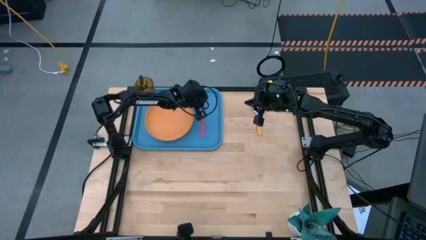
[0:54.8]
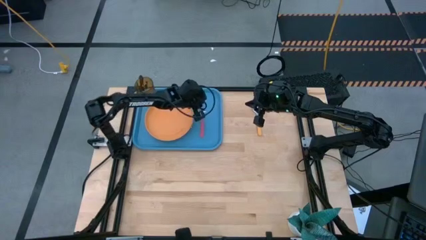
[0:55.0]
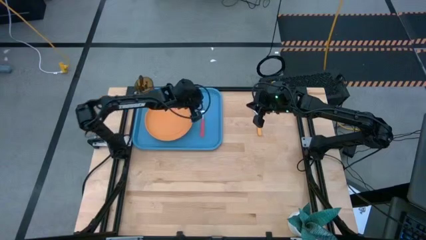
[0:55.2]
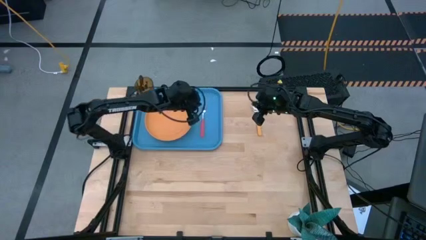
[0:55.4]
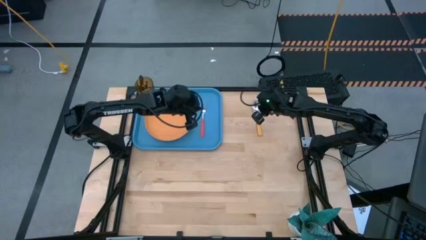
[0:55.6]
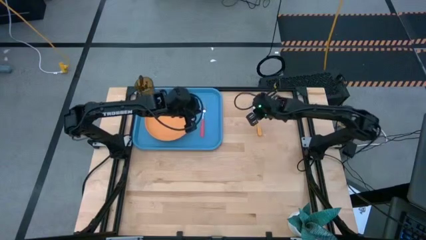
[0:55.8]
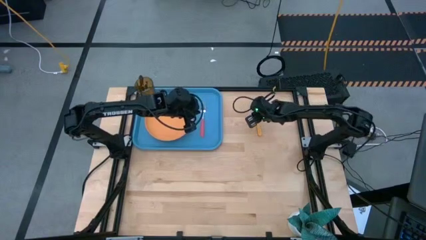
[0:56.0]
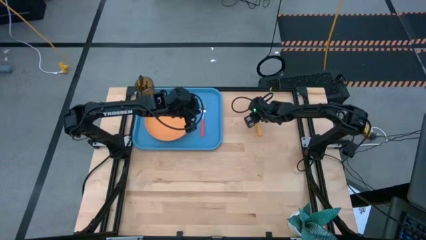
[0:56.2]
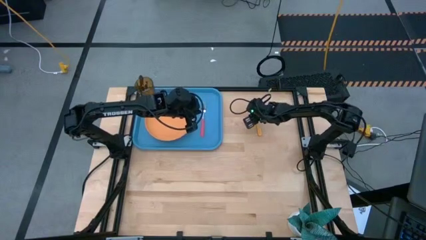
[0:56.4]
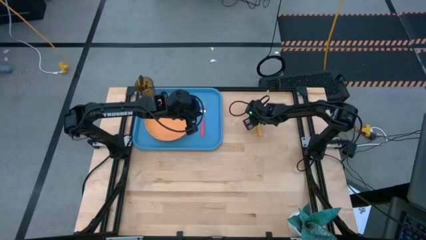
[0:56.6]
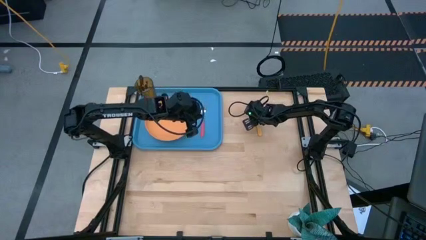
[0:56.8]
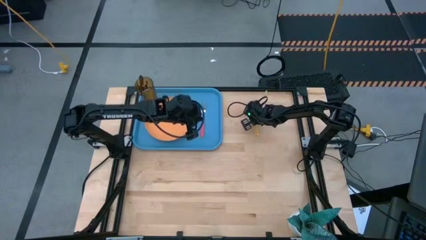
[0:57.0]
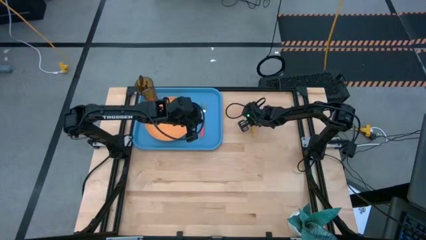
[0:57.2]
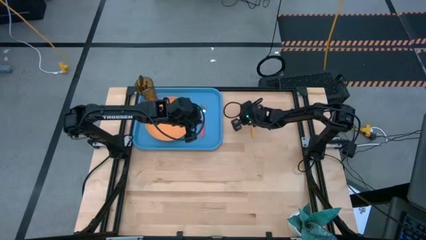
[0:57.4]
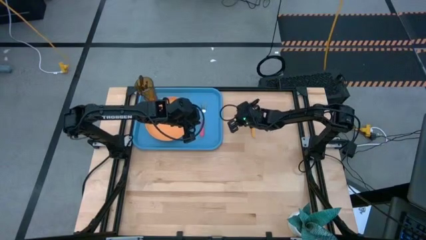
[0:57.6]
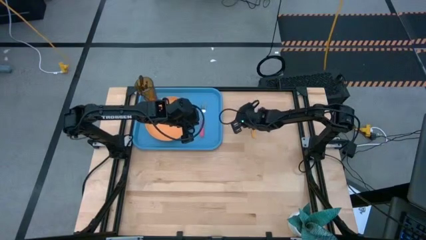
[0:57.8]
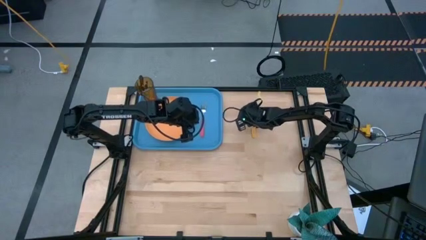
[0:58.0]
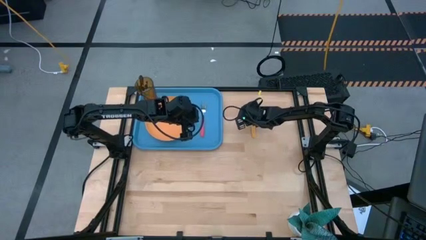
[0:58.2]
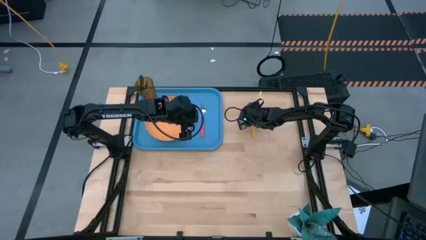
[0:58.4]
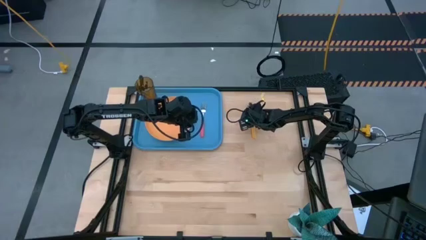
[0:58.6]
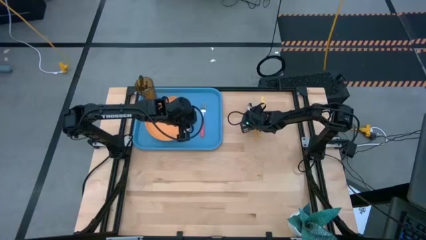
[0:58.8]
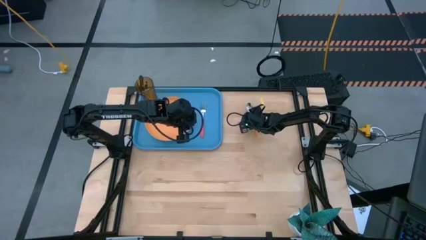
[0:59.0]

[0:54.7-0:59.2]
Task: Pick and place plate/cup/fork/spoon on tray
Put the yellow spoon on the blue tray

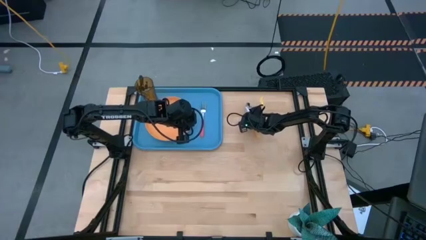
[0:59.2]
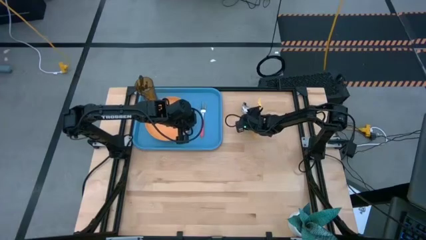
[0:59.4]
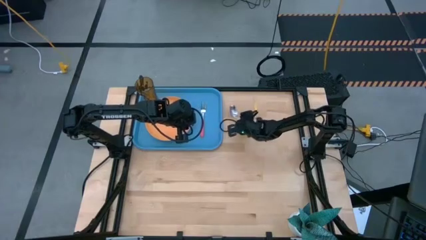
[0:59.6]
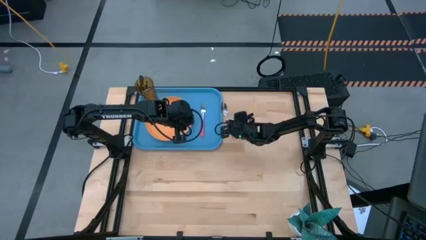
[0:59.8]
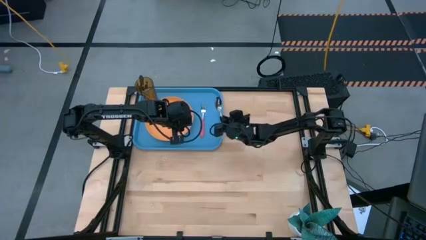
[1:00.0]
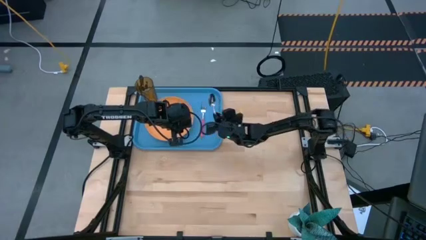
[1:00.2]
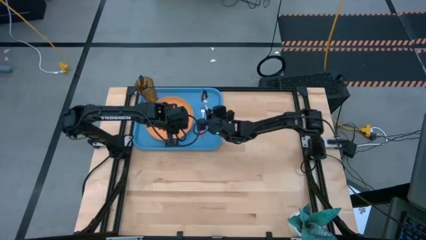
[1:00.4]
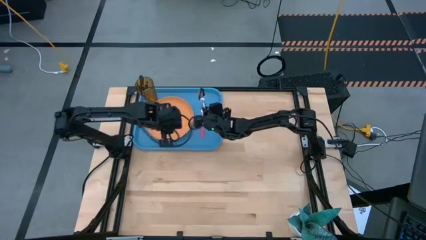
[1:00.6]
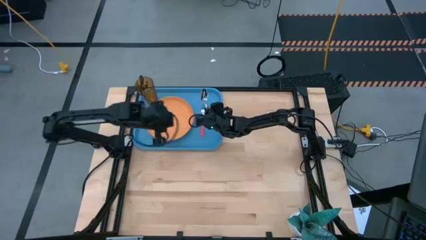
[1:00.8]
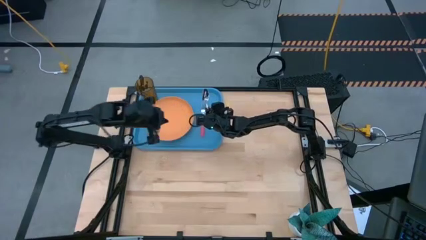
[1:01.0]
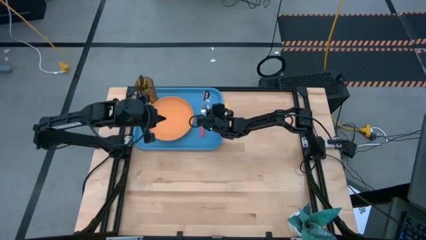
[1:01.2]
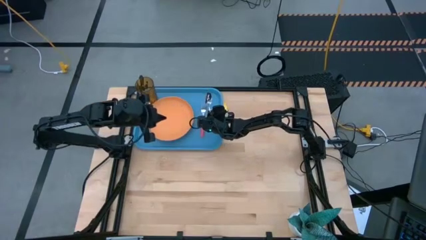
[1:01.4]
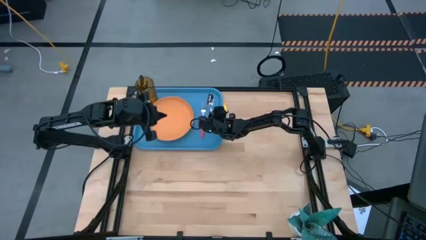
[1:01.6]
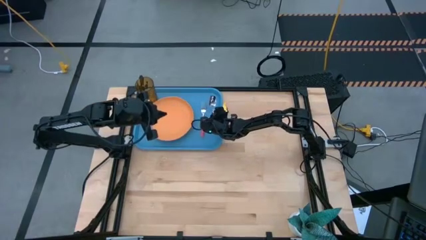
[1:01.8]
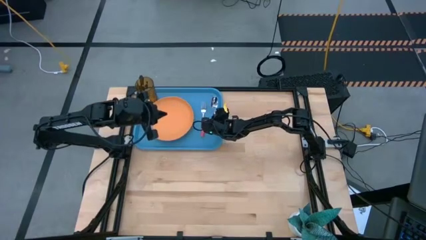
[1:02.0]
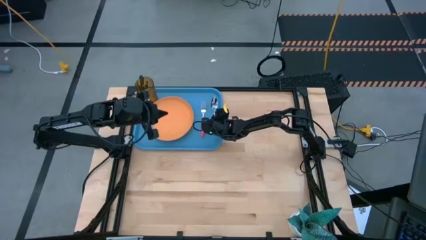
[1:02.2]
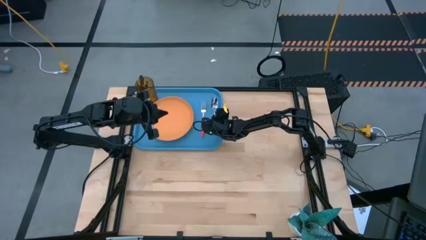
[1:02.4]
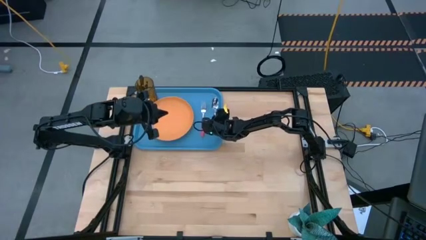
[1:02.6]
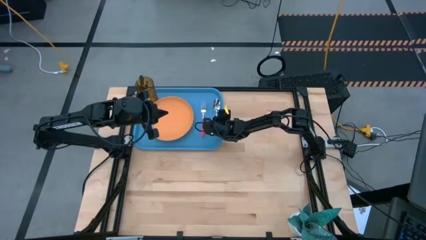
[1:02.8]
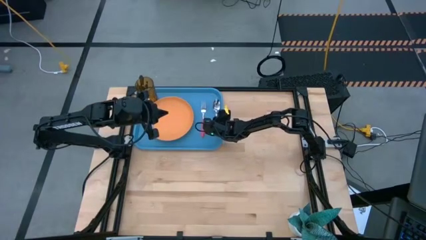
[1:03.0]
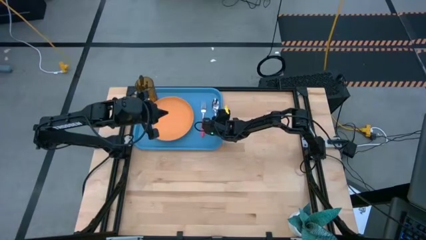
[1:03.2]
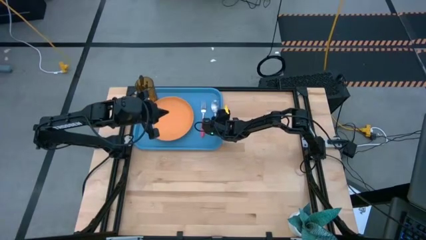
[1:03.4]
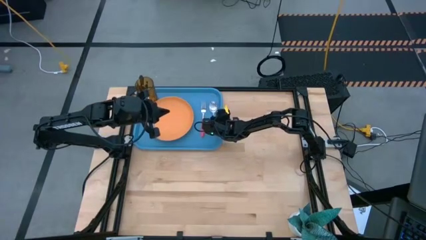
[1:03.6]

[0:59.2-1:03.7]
Put the yellow spoon on the blue tray

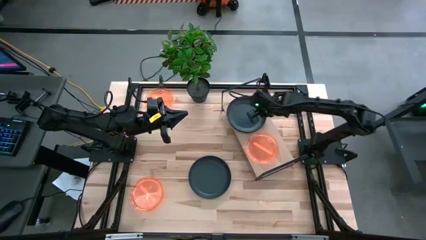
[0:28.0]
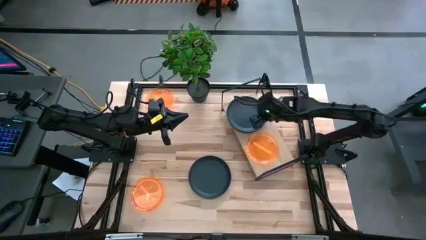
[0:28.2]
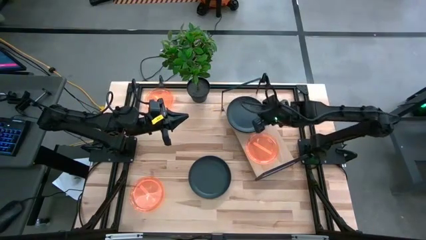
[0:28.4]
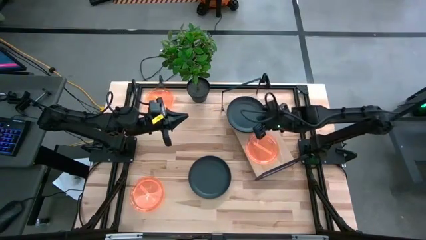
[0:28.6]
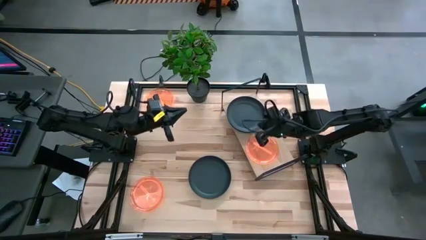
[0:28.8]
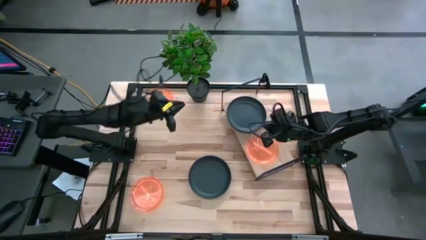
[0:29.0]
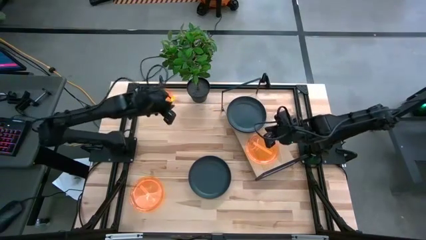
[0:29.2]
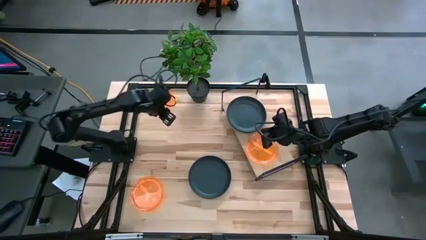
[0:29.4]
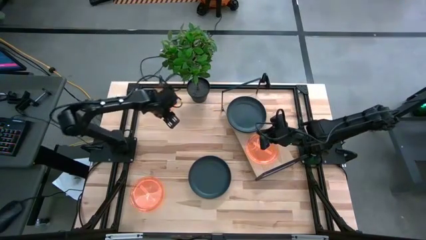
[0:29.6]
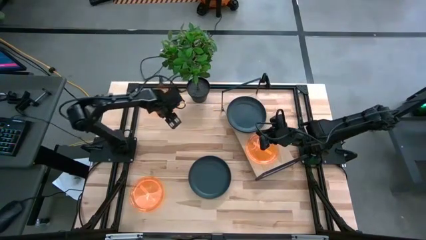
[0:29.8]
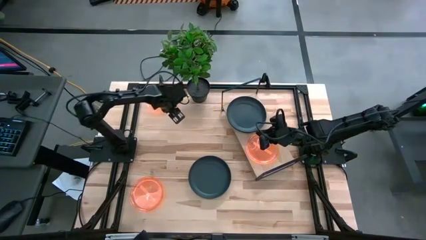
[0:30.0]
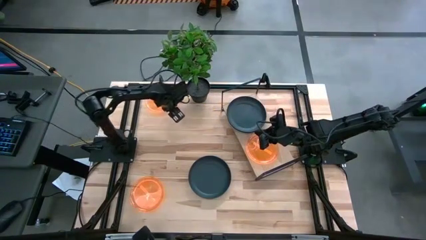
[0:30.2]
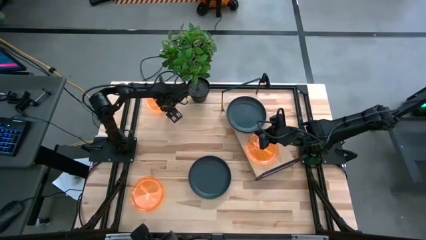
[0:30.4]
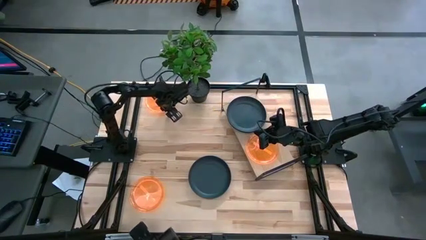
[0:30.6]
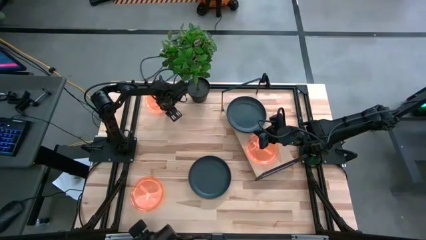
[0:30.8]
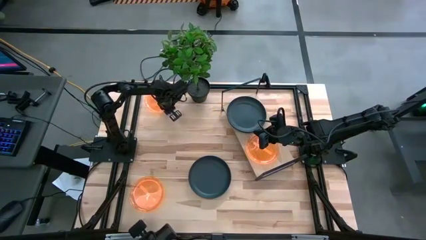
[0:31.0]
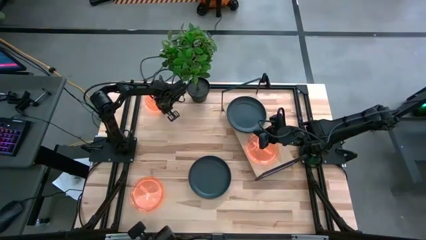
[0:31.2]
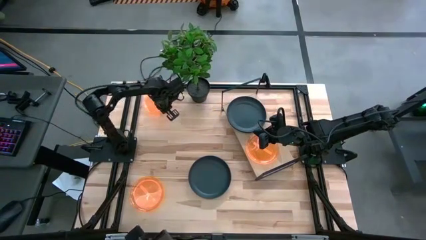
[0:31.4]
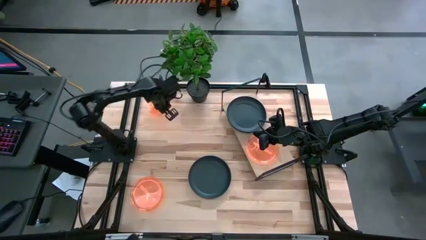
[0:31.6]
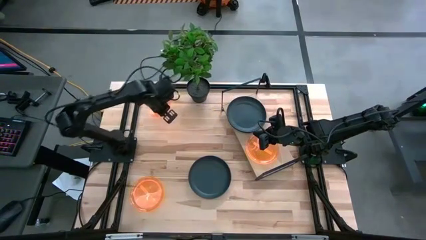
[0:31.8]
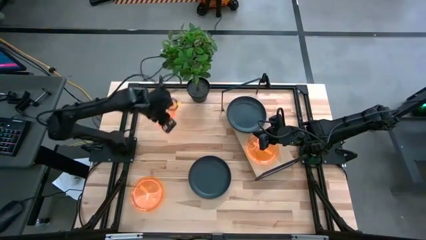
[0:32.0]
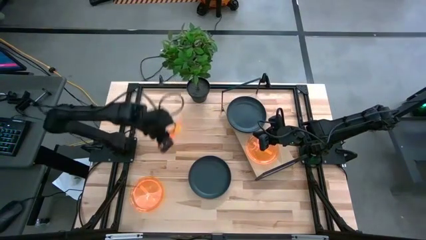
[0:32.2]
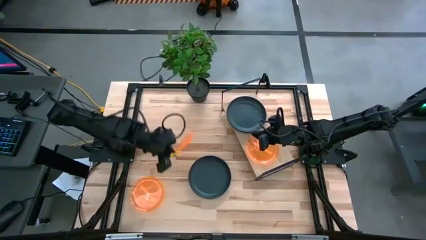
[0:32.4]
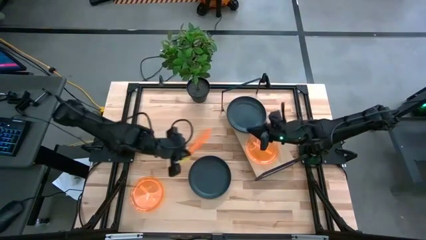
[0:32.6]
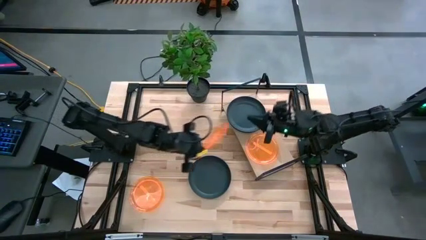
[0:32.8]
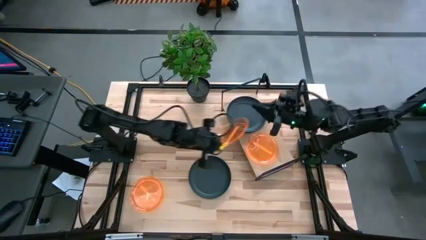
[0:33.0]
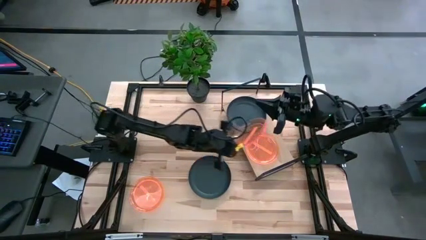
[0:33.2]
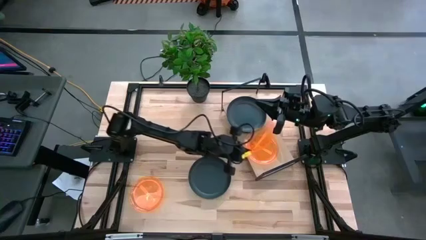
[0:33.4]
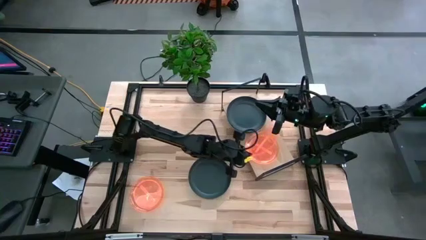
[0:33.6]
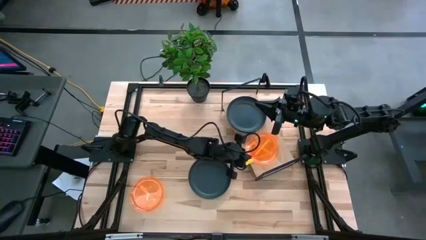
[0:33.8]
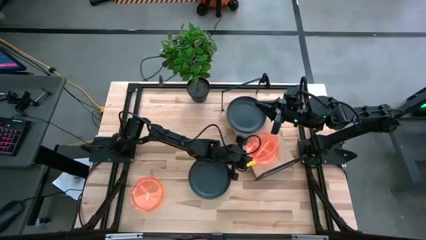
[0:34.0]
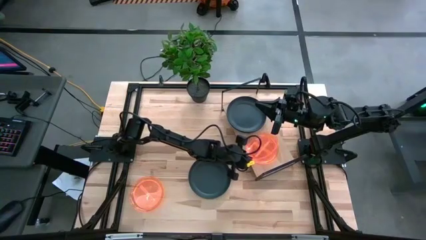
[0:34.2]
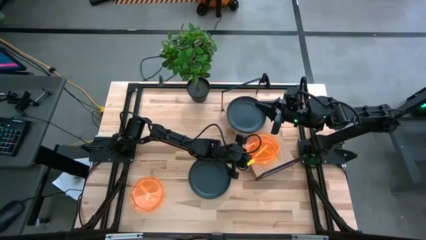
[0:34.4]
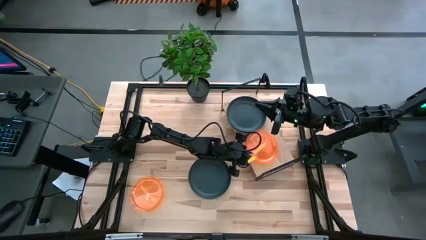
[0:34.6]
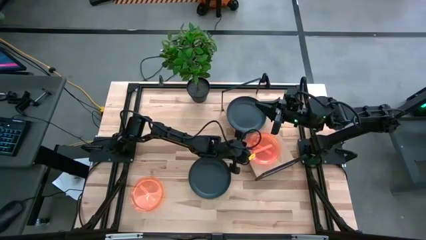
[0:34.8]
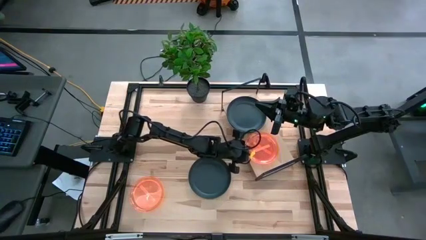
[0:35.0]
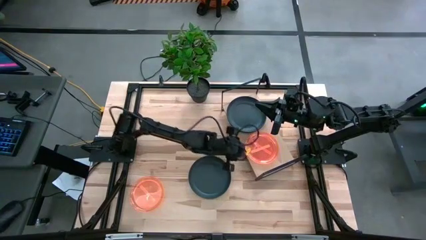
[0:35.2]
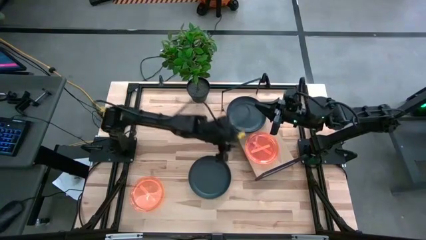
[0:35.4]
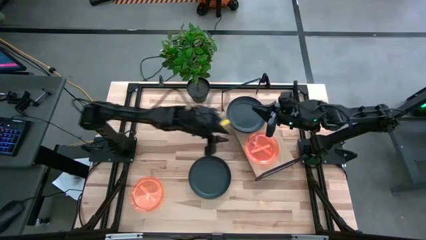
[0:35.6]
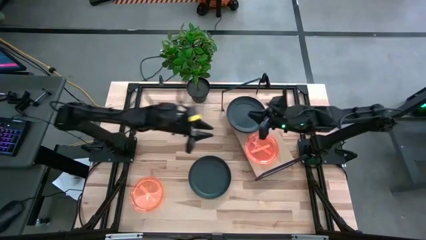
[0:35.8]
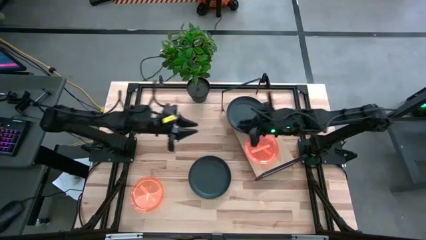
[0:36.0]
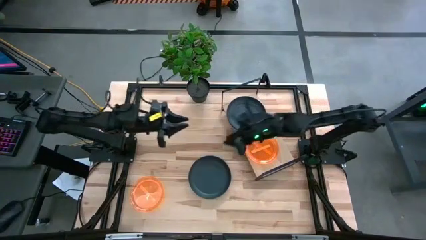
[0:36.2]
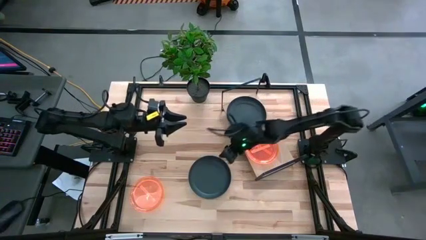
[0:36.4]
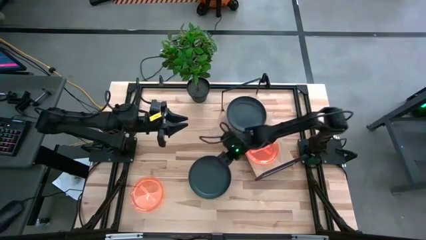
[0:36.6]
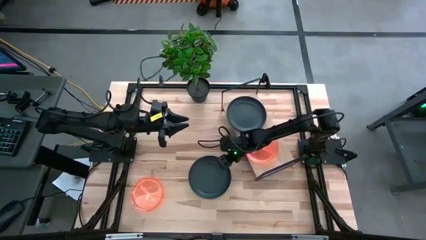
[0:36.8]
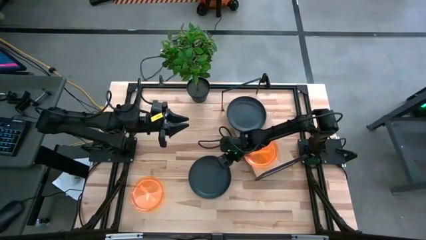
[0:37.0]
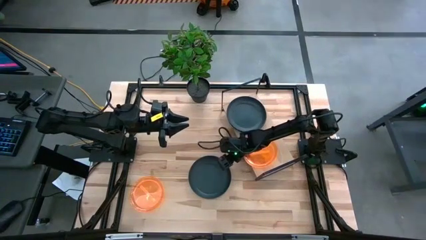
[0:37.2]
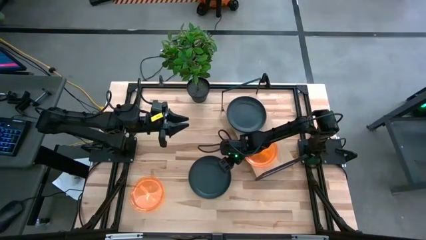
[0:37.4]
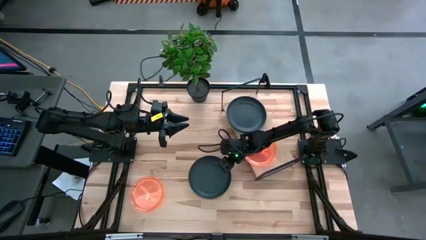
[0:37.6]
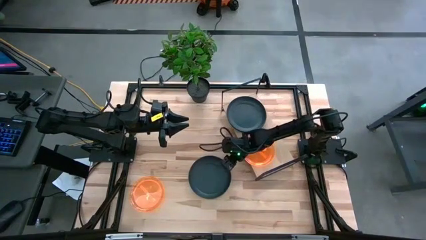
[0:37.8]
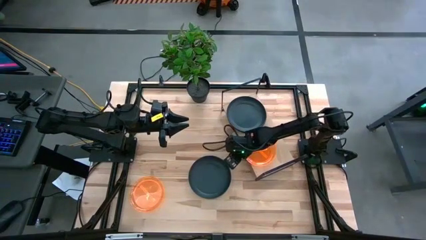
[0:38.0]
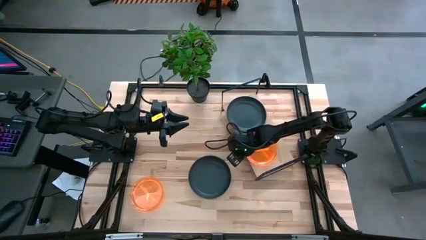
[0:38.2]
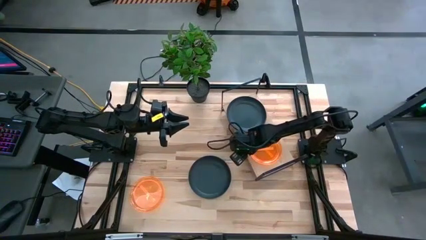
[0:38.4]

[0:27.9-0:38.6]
Task: Place and stack plates onto a shelf
Stack the top orange plate on top of the orange plate on the shelf
